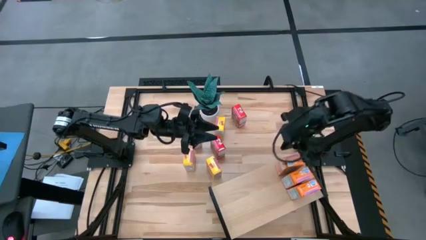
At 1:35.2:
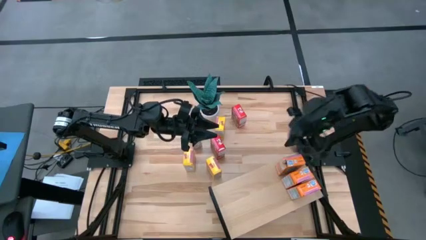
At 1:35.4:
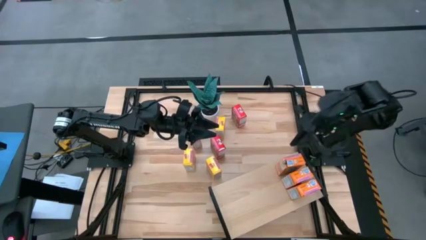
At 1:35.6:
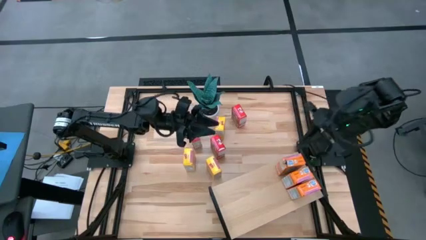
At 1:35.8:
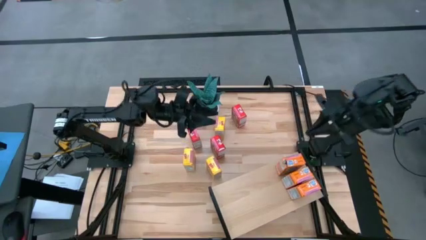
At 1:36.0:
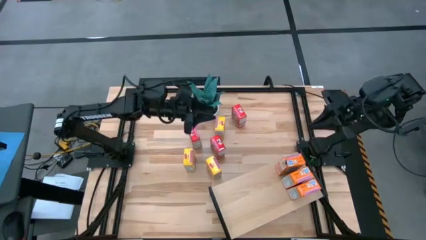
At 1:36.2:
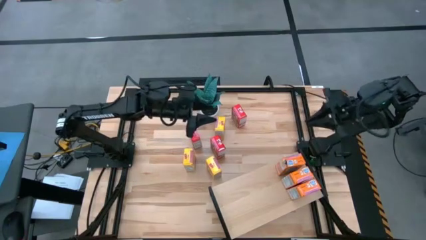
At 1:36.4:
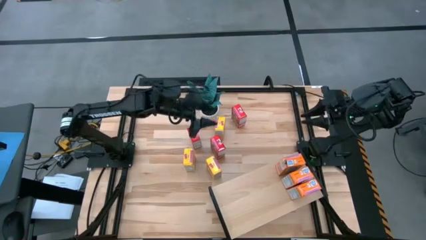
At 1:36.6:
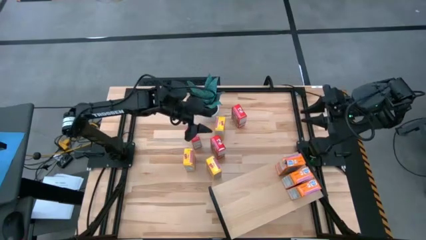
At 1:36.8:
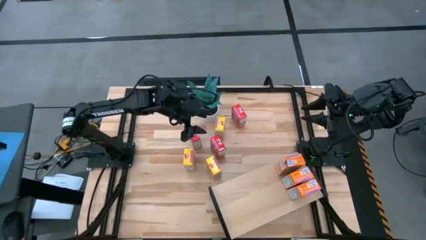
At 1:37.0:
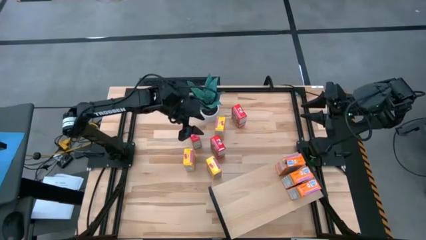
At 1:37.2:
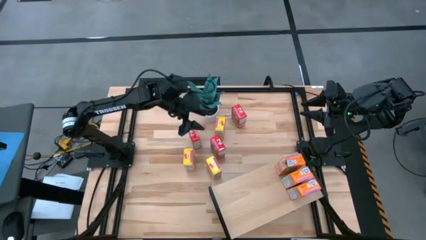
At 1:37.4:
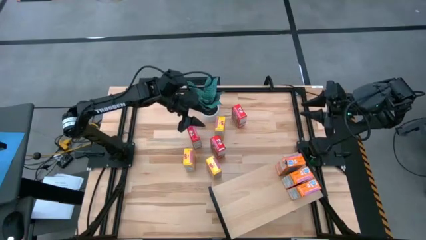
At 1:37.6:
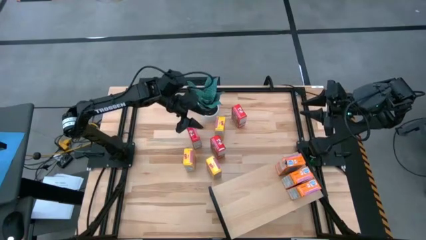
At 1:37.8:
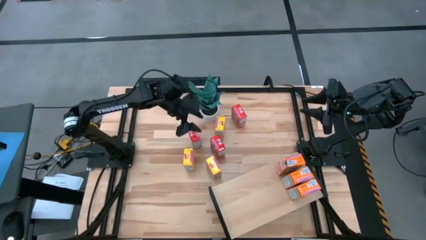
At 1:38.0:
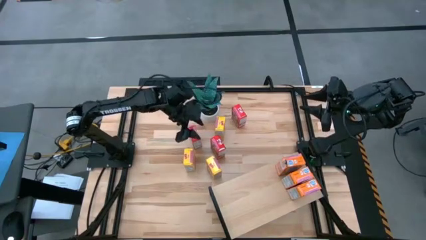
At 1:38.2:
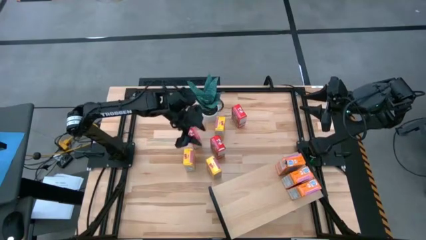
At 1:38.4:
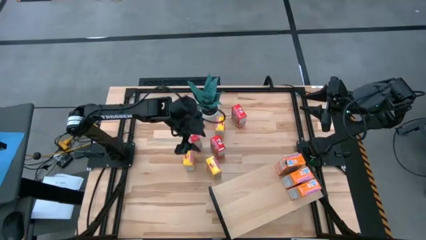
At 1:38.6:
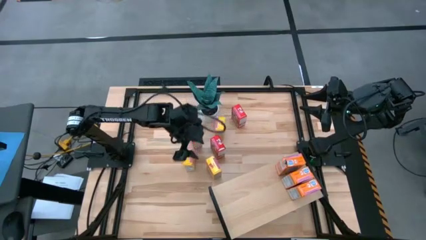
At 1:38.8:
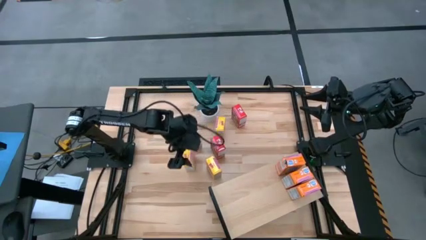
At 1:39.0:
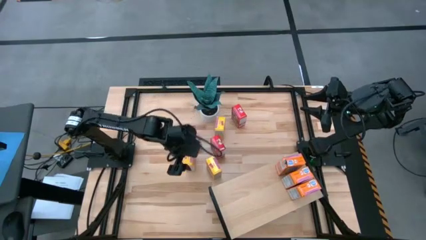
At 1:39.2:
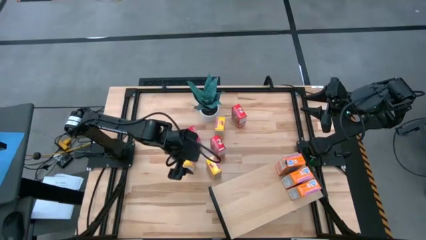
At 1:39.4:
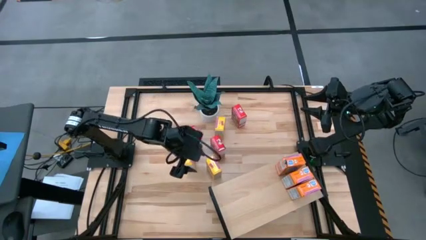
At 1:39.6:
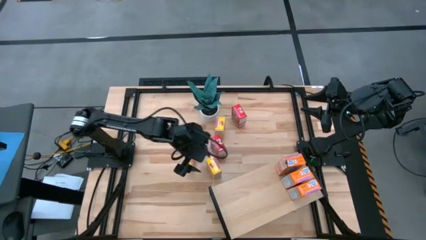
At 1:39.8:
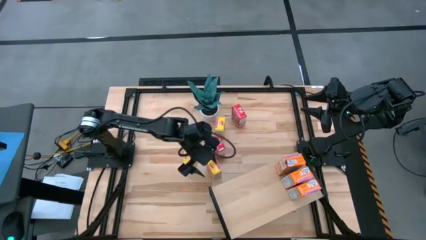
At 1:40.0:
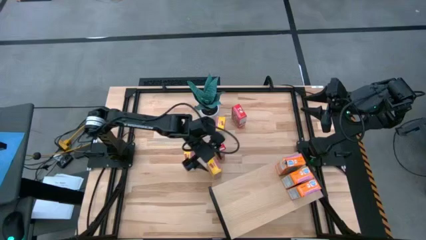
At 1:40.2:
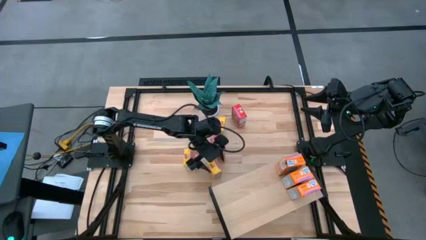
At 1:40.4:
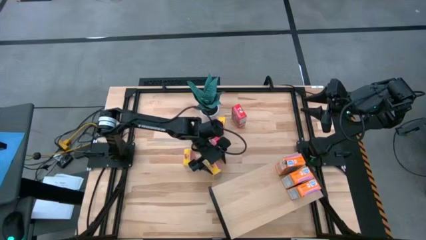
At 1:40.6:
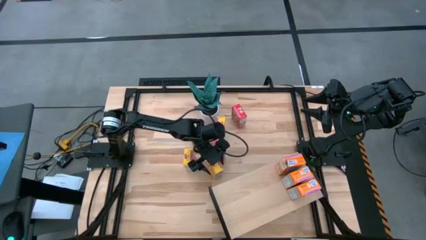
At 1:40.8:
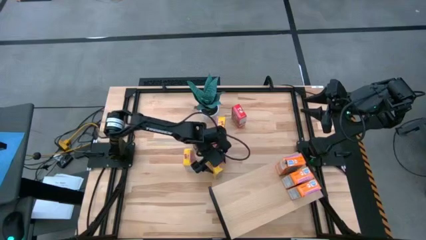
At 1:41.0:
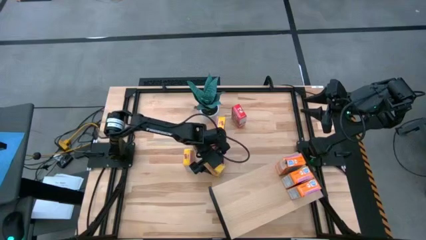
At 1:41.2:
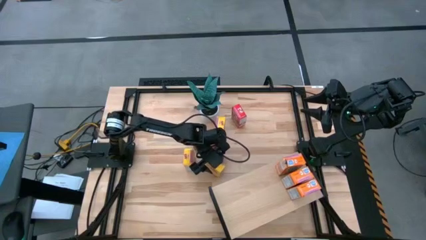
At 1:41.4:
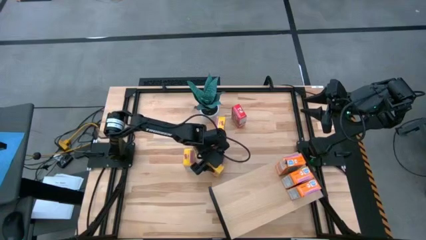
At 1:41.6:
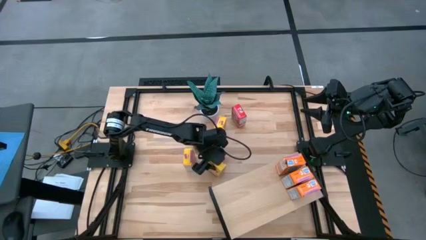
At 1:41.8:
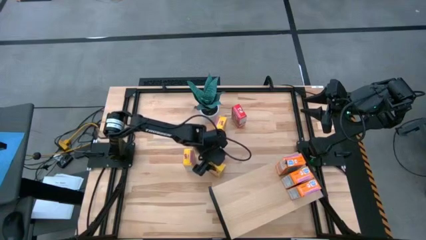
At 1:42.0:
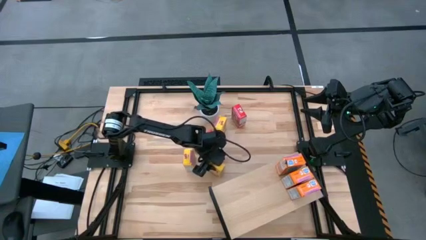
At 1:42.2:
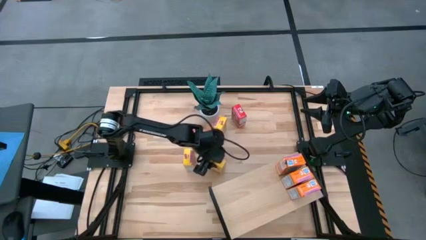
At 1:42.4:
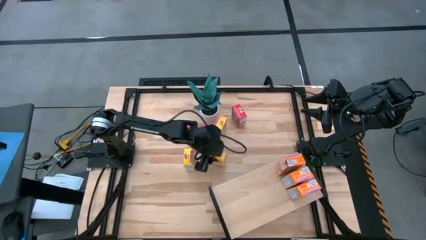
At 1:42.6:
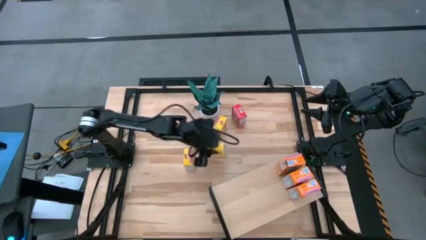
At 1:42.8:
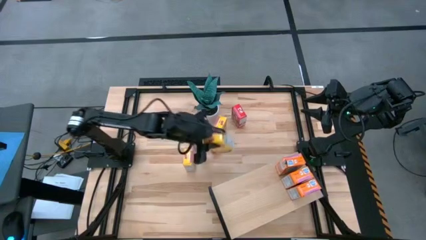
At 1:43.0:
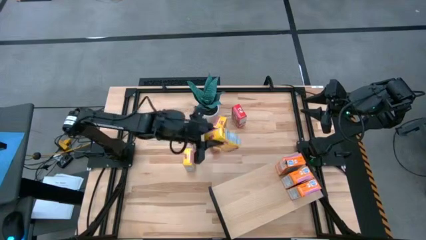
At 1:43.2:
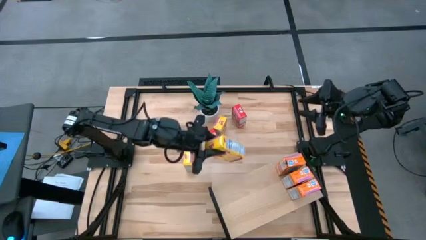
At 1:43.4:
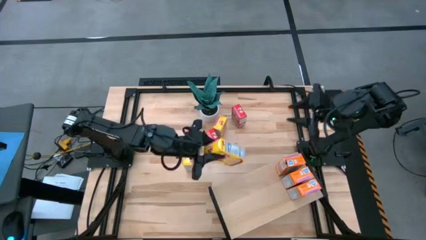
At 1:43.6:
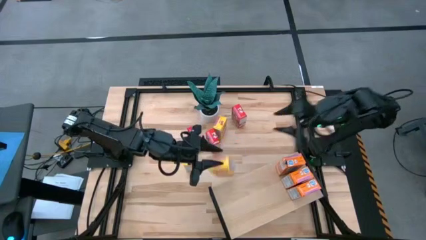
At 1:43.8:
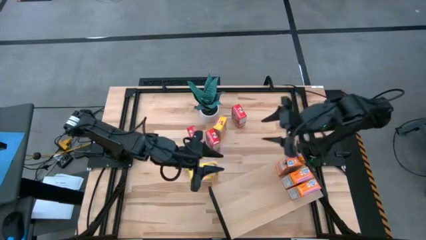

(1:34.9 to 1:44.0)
Task: Stack cereal on shelf
Put the bottom right yellow cereal box on the shelf
